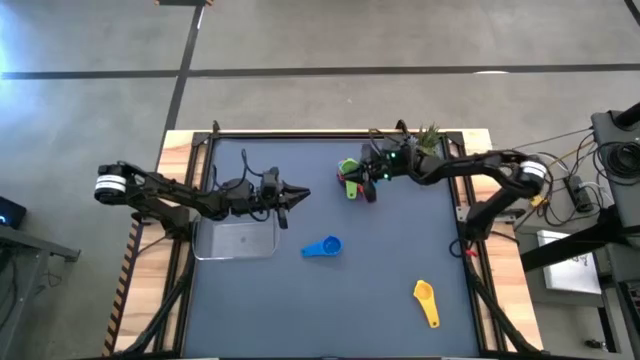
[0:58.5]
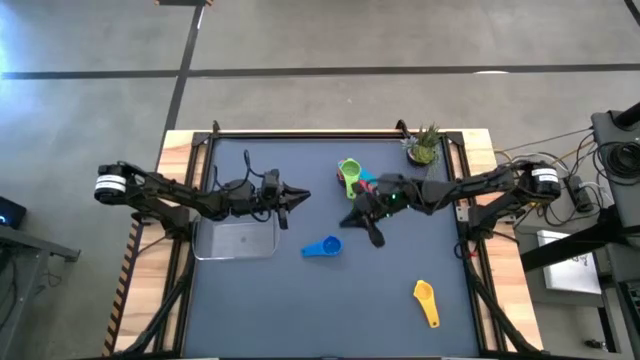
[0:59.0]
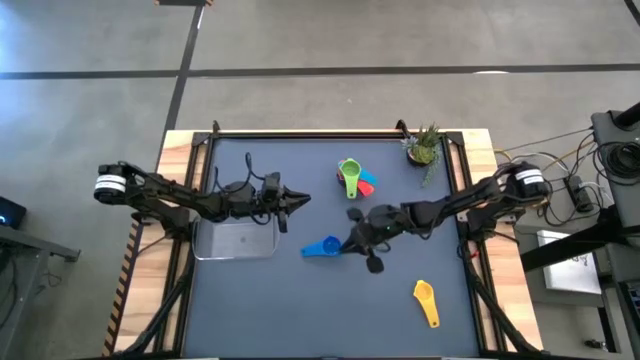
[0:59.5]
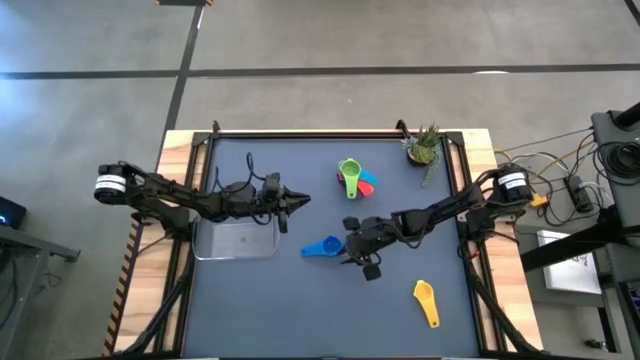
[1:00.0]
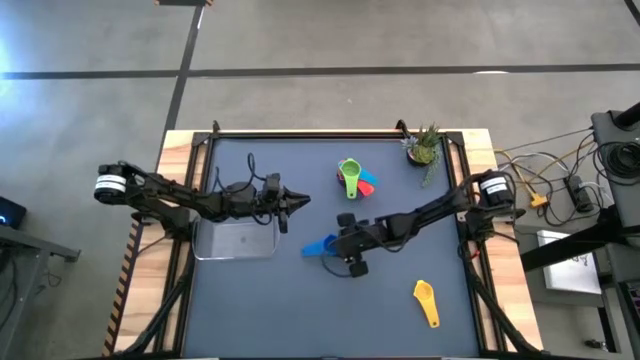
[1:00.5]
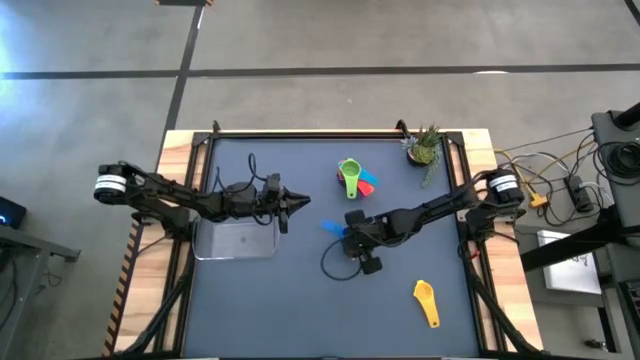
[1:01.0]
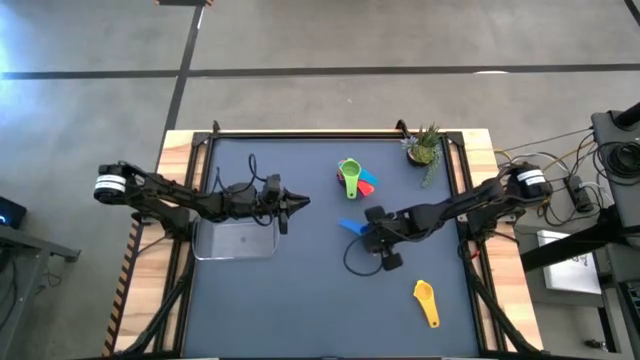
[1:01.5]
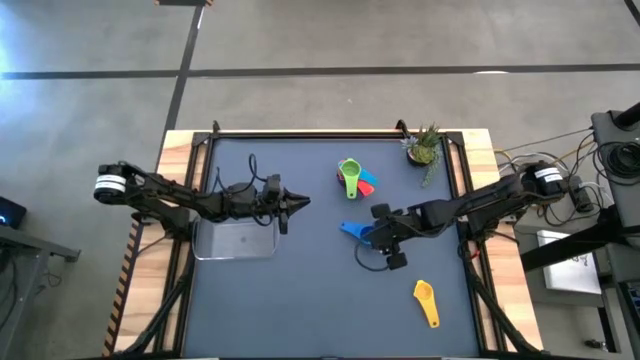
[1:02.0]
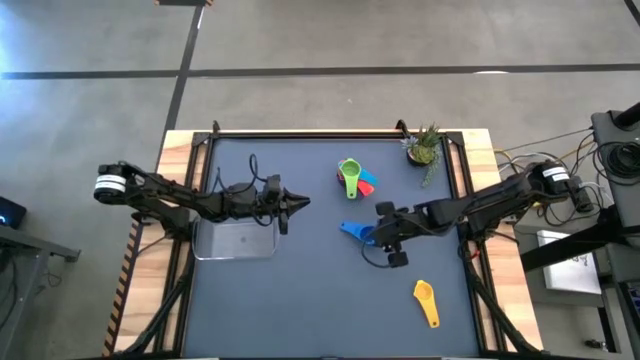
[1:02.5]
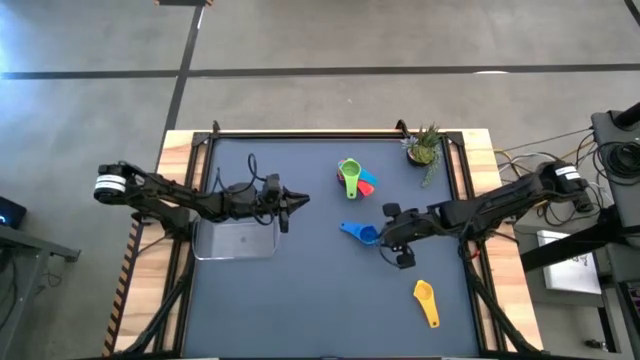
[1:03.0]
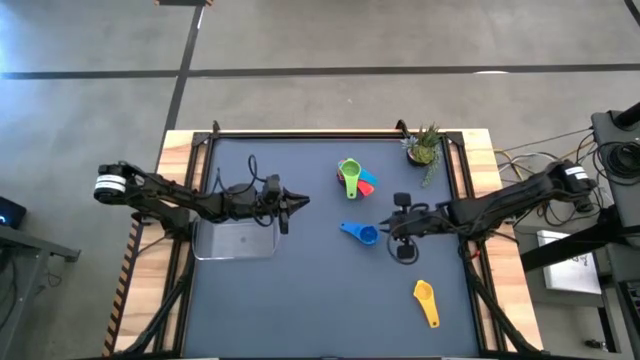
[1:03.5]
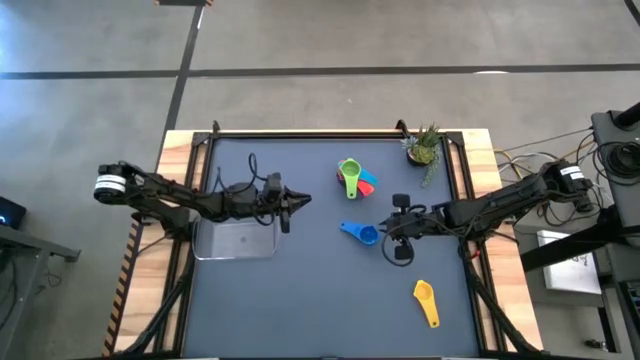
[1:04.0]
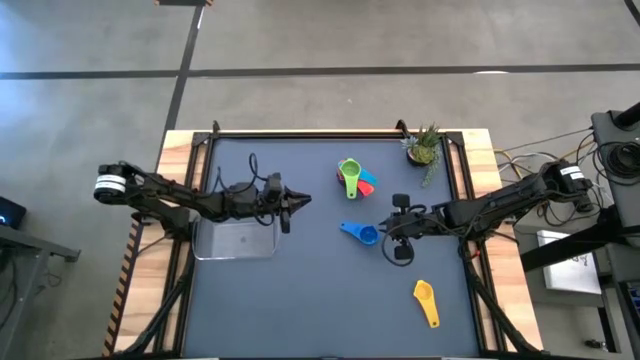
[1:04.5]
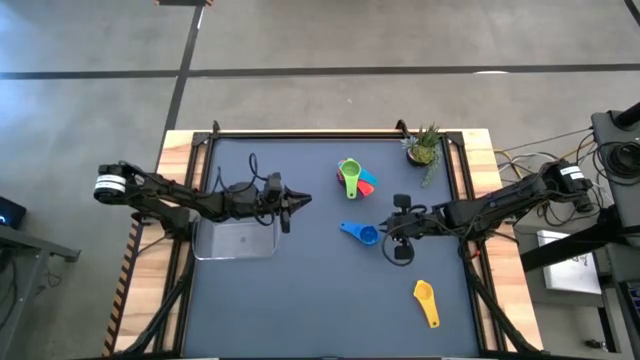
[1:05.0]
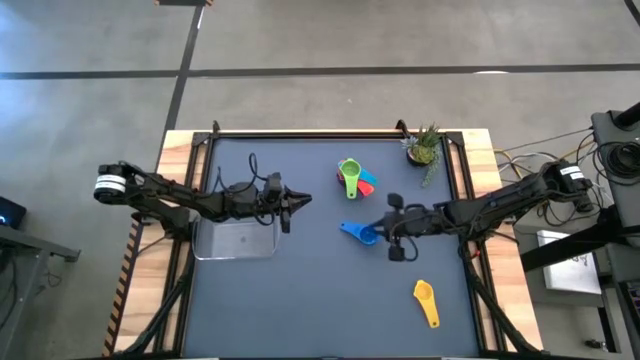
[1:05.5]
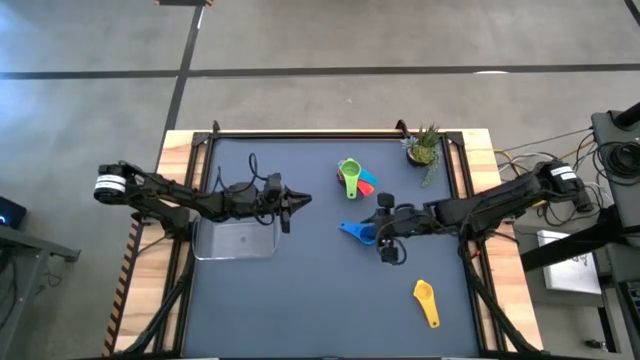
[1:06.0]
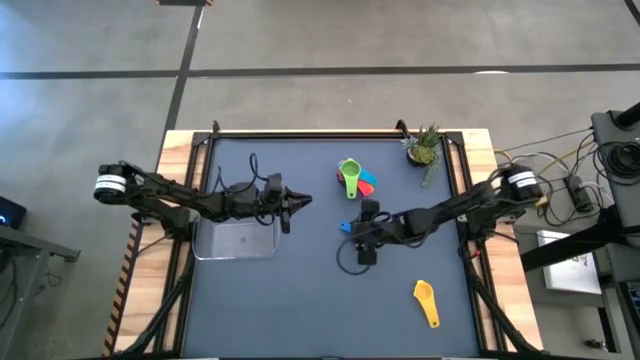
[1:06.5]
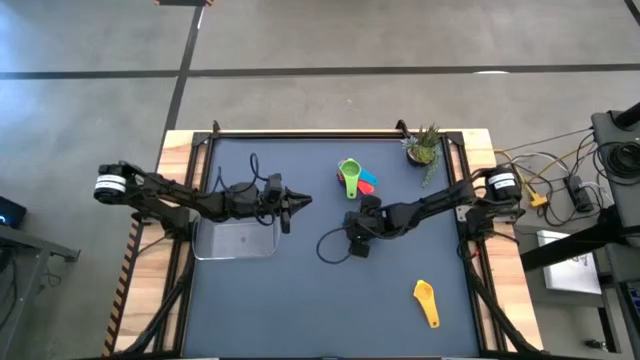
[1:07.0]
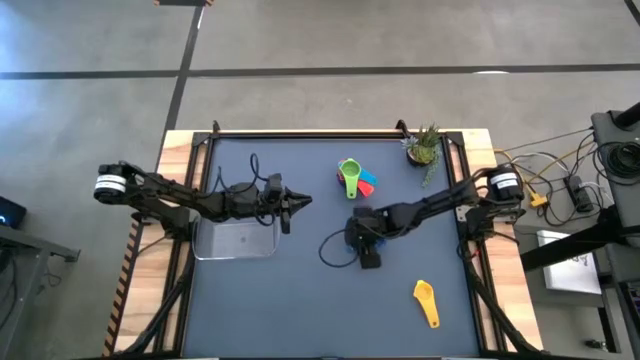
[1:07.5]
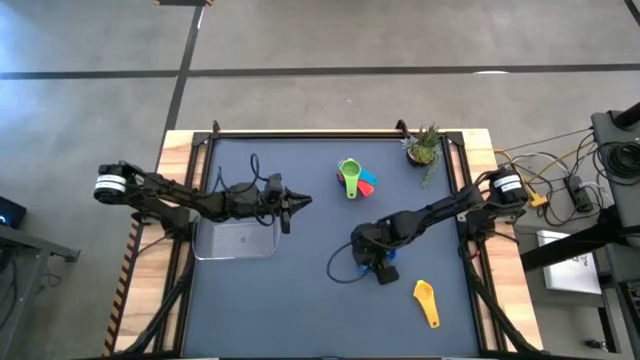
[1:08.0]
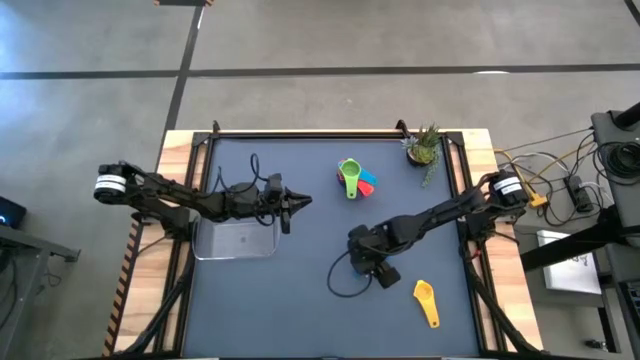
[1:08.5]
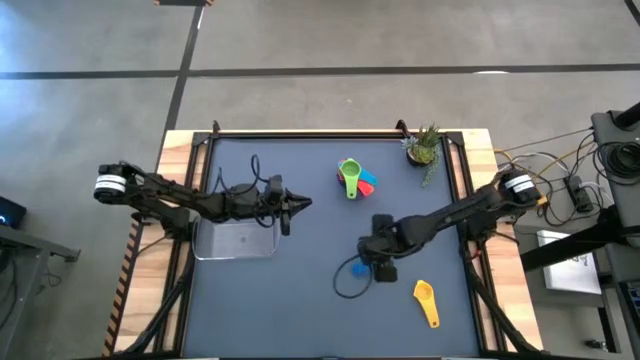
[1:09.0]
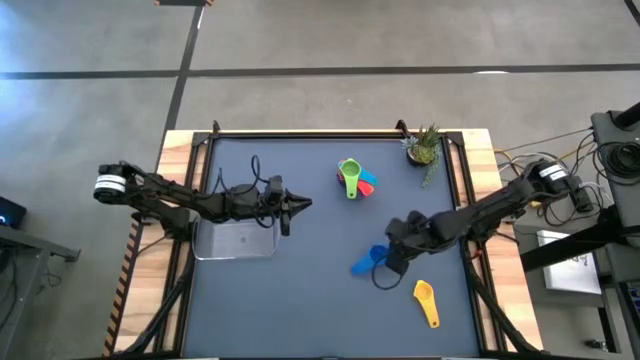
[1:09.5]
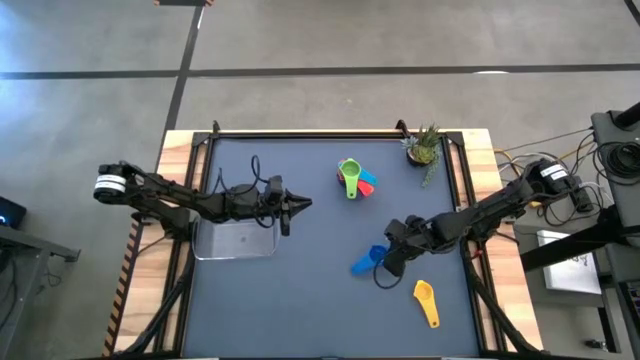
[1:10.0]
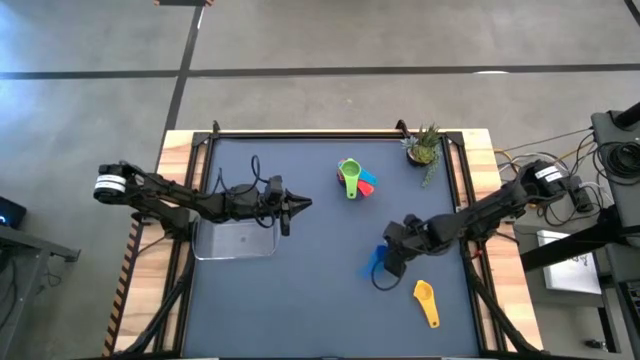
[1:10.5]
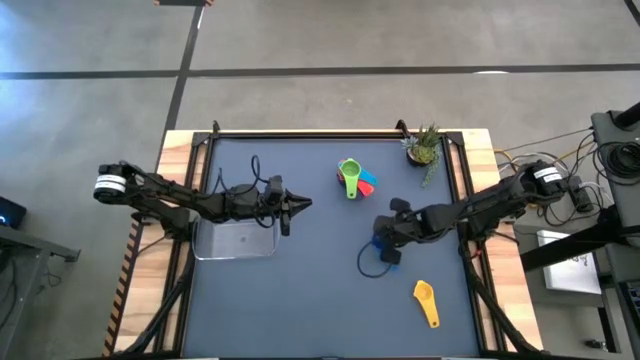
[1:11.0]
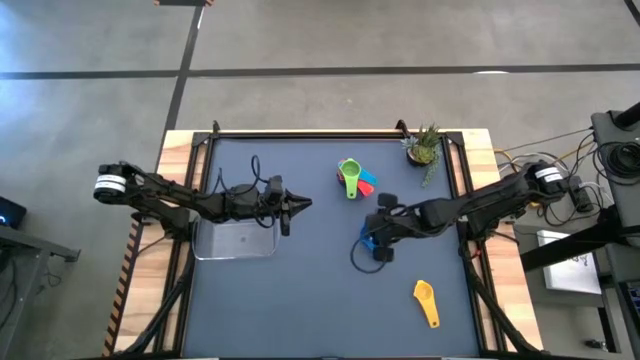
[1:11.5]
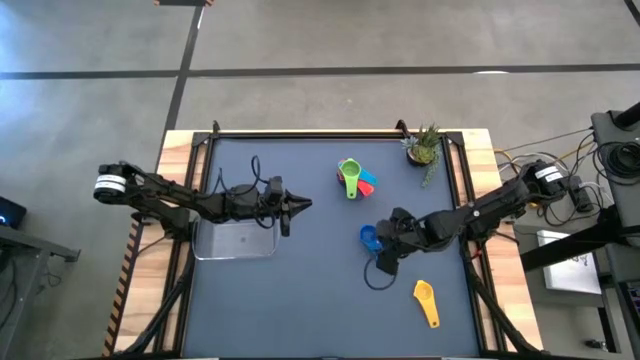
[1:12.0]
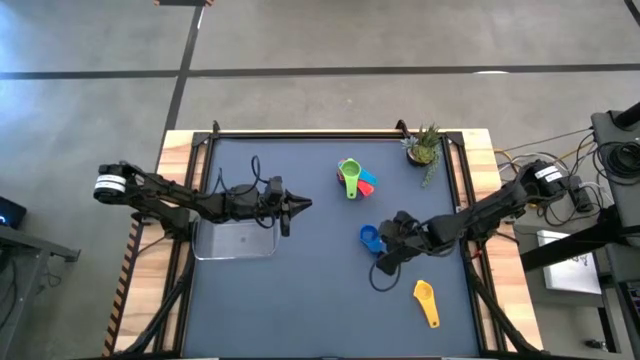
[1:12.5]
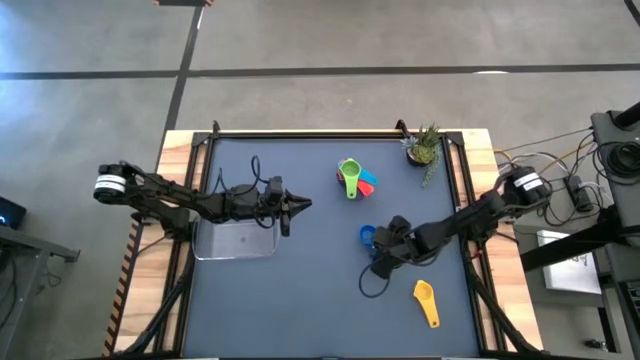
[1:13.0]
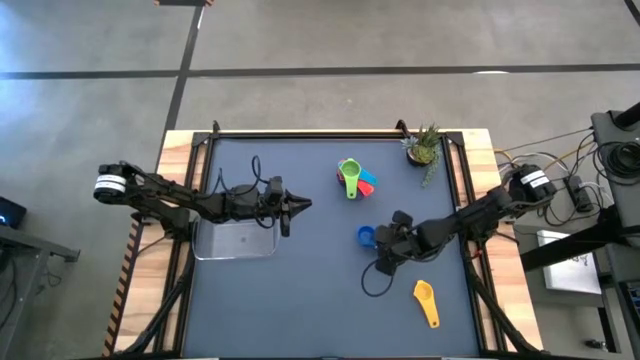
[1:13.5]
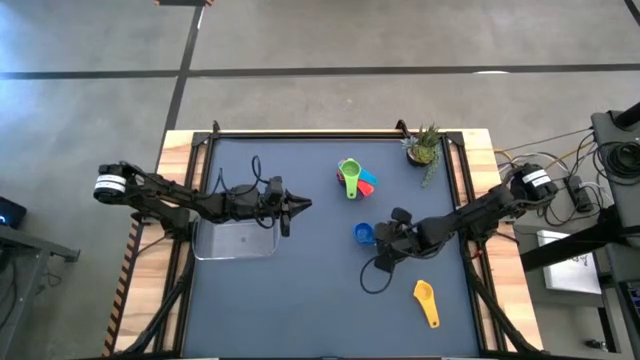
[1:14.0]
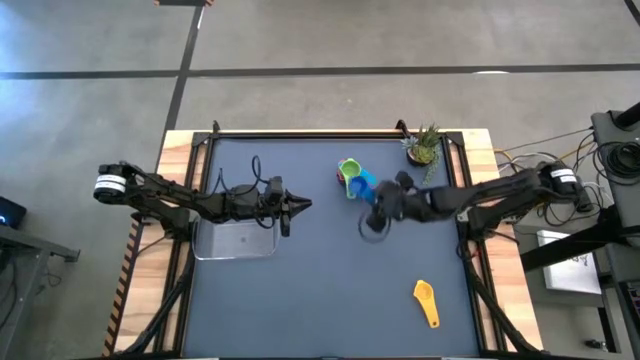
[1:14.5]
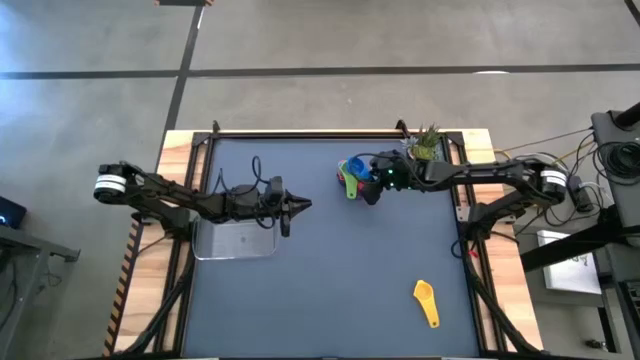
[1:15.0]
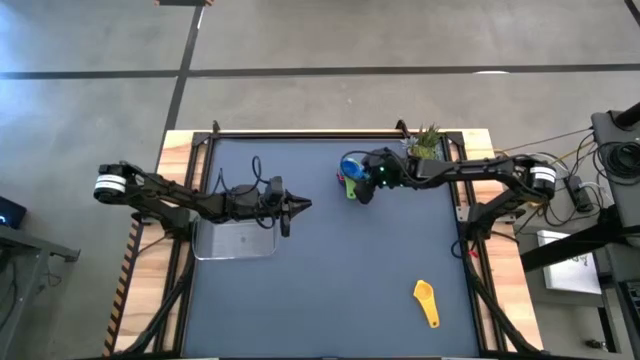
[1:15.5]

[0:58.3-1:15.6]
Task: Nest measuring cups in basket
Stack the blue measuring cup on top of the green measuring cup

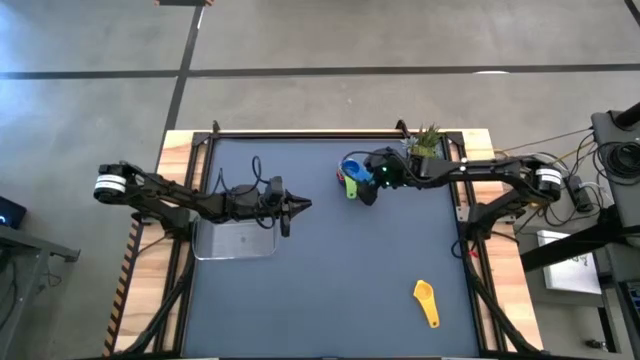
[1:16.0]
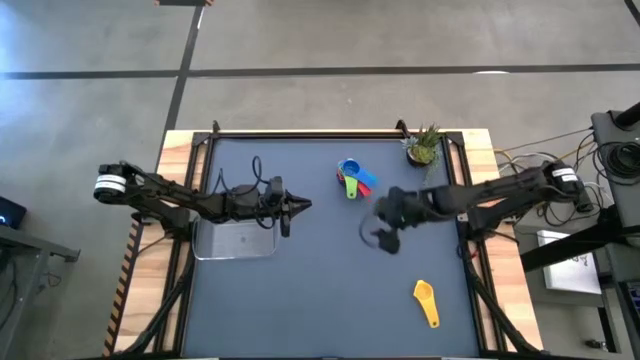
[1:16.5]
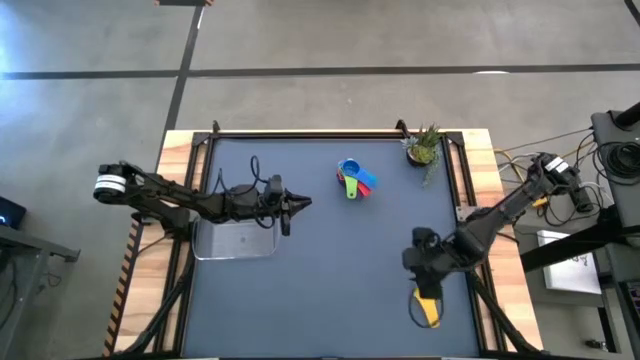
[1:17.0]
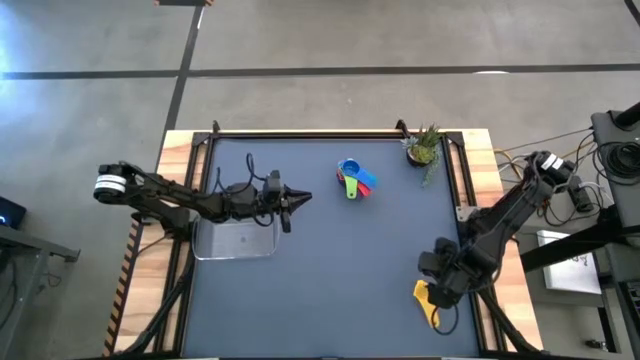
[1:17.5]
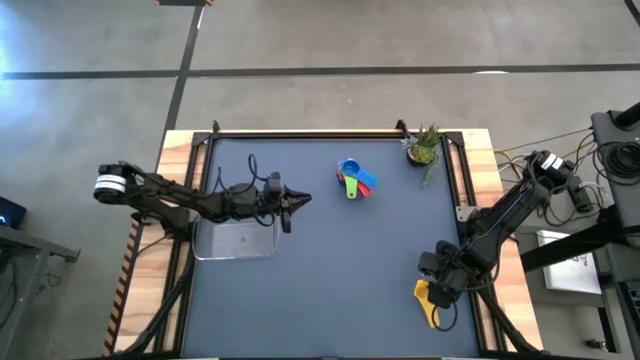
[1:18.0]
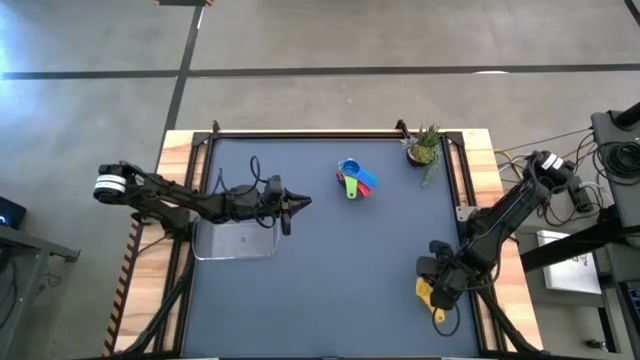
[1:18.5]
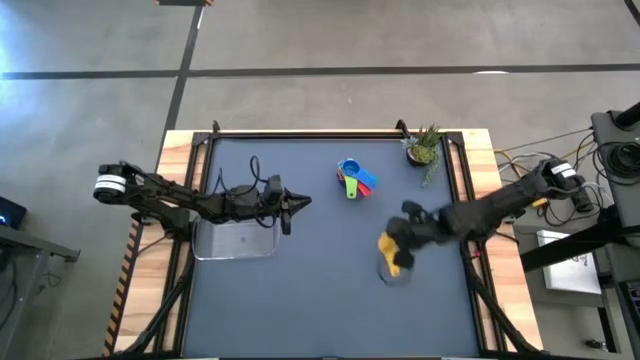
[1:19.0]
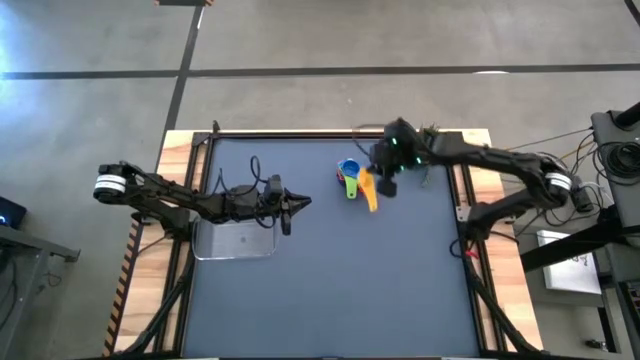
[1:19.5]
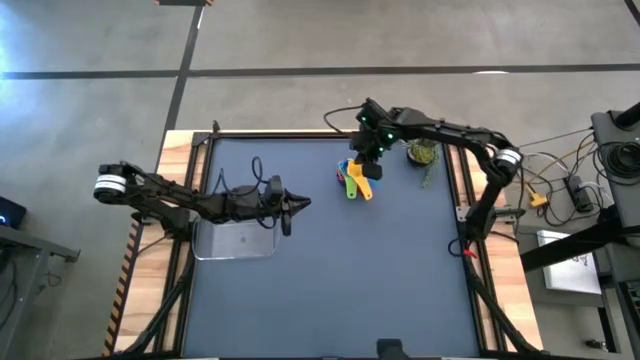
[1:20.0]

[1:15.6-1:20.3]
Stack the yellow measuring cup on top of the blue measuring cup
